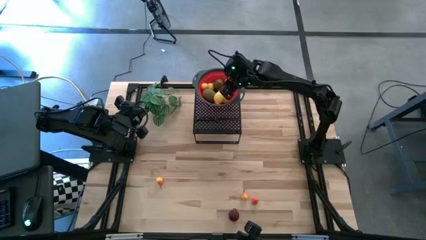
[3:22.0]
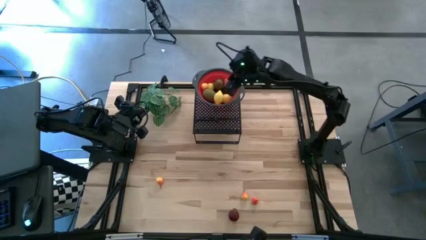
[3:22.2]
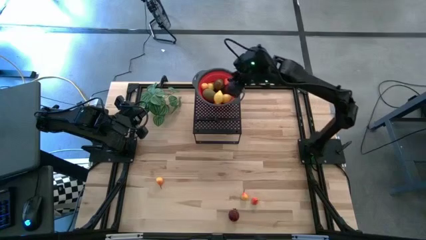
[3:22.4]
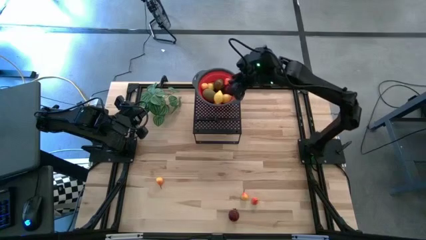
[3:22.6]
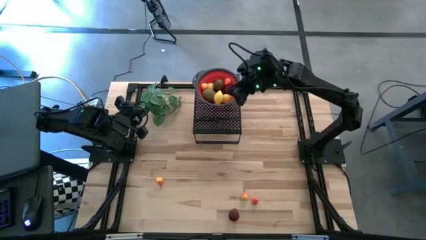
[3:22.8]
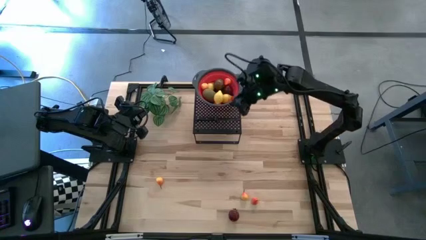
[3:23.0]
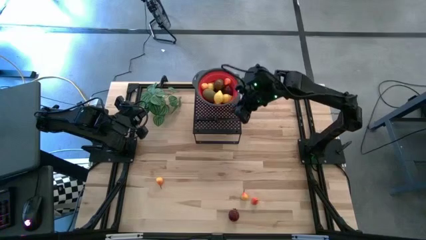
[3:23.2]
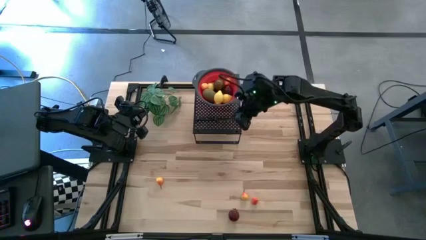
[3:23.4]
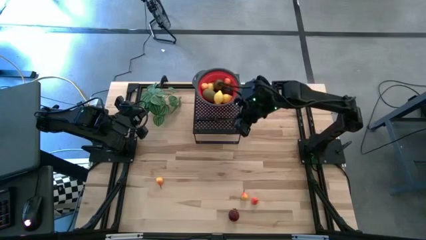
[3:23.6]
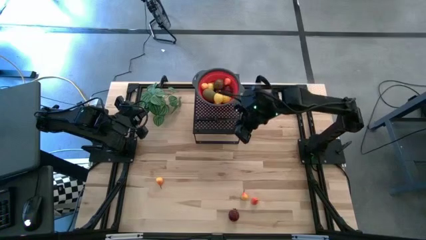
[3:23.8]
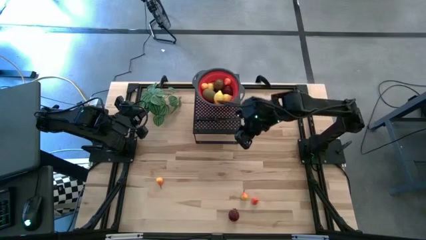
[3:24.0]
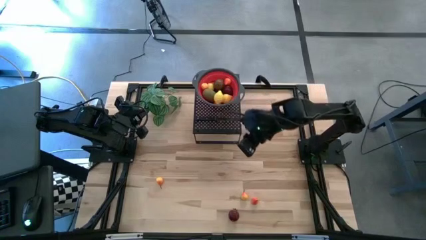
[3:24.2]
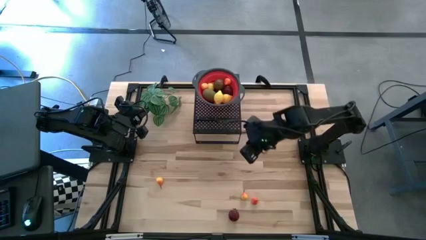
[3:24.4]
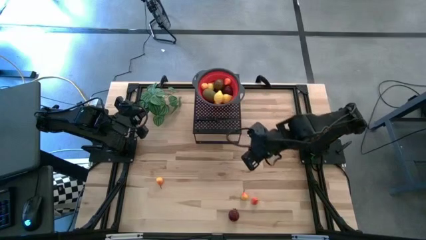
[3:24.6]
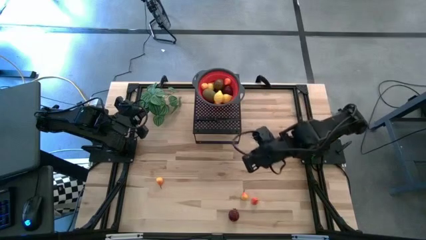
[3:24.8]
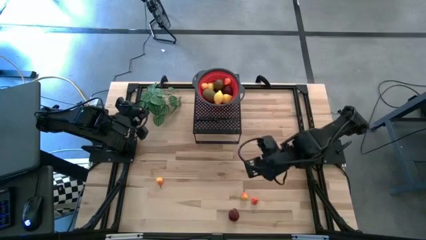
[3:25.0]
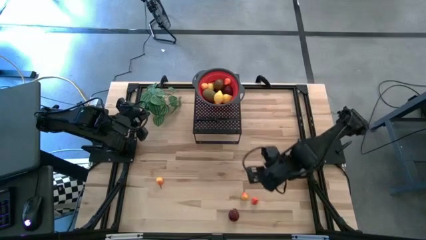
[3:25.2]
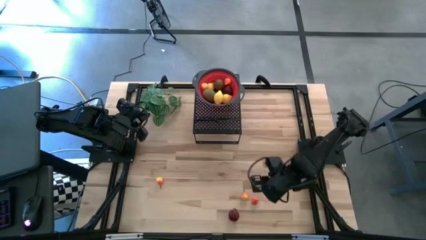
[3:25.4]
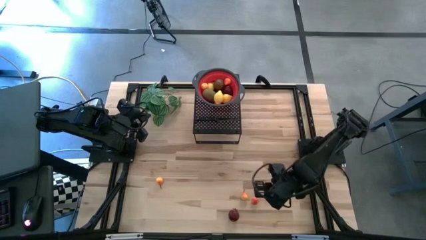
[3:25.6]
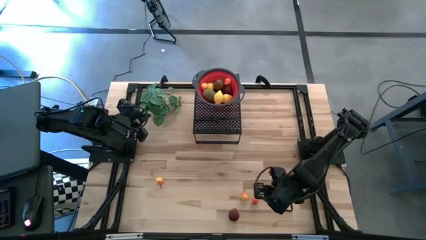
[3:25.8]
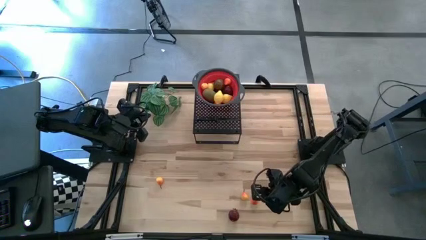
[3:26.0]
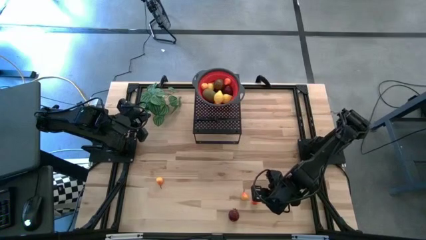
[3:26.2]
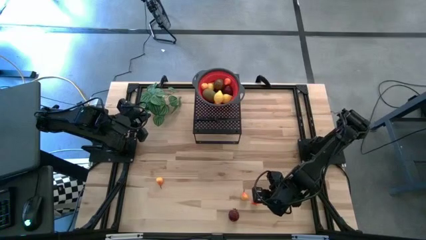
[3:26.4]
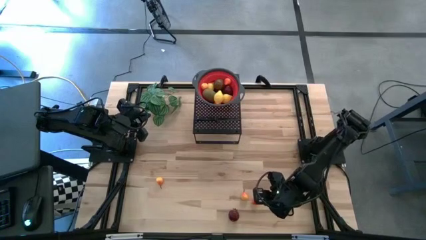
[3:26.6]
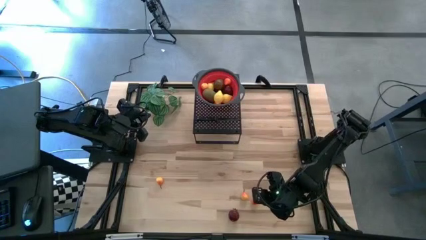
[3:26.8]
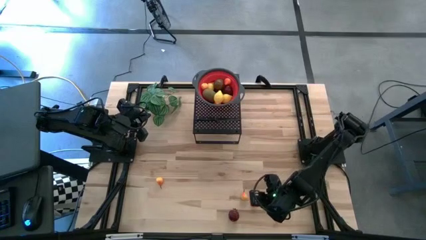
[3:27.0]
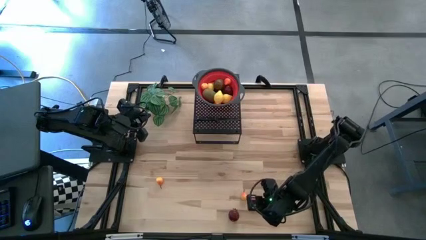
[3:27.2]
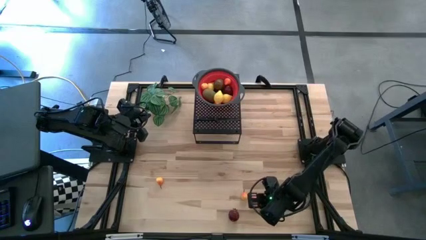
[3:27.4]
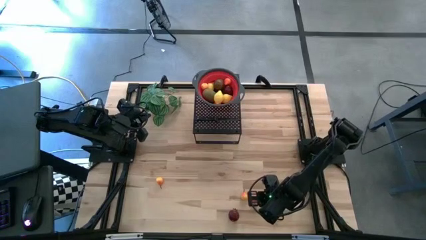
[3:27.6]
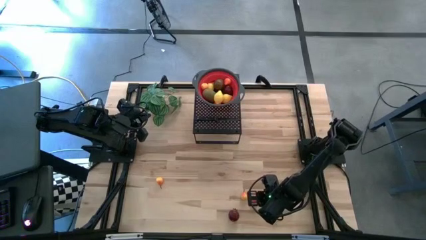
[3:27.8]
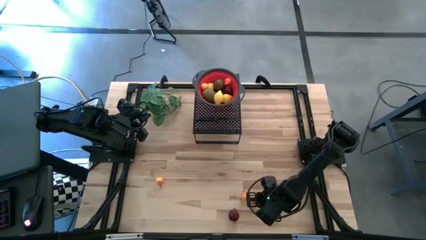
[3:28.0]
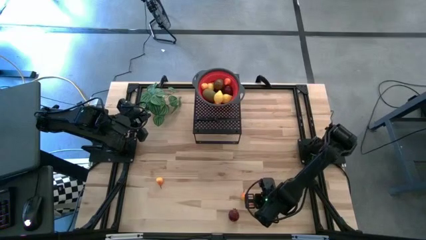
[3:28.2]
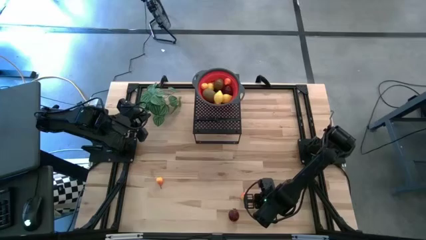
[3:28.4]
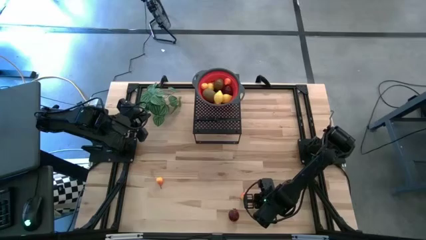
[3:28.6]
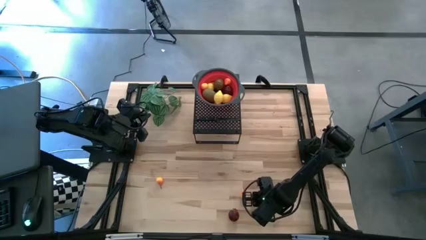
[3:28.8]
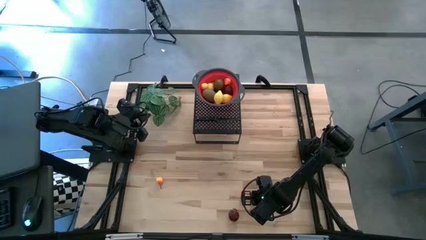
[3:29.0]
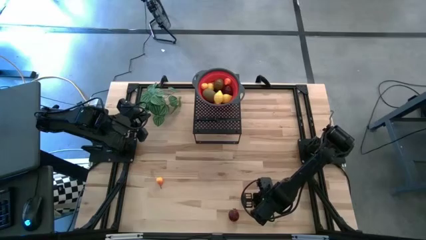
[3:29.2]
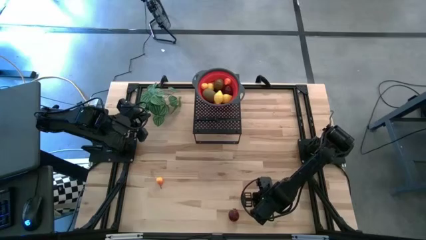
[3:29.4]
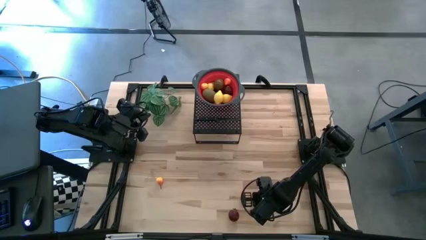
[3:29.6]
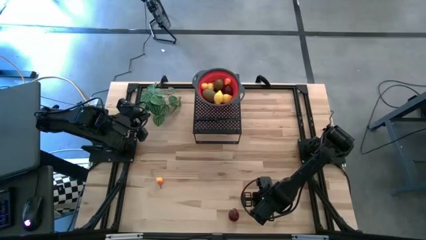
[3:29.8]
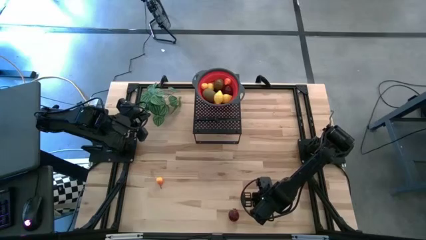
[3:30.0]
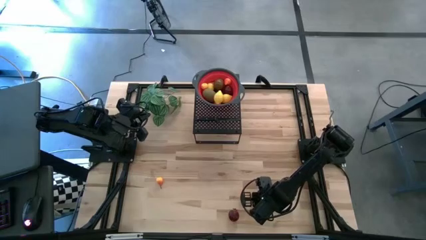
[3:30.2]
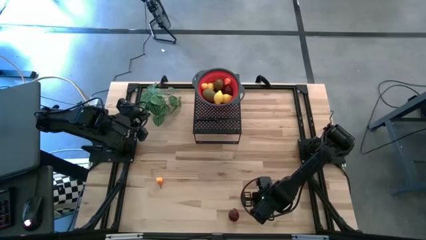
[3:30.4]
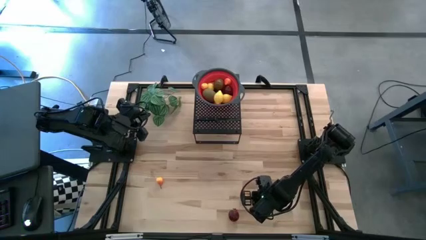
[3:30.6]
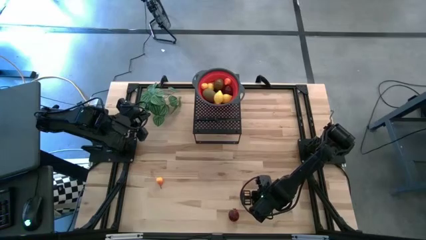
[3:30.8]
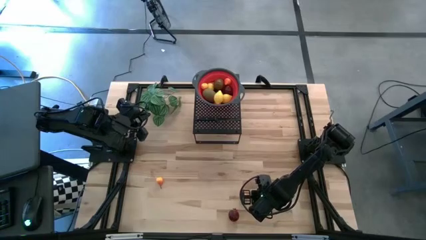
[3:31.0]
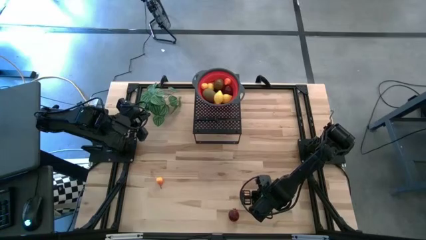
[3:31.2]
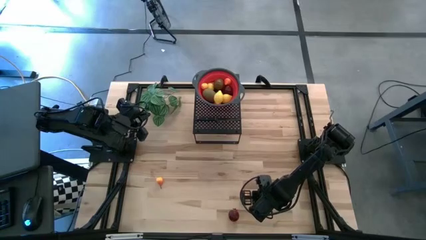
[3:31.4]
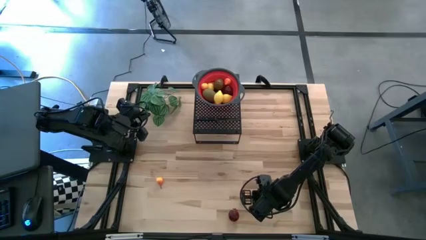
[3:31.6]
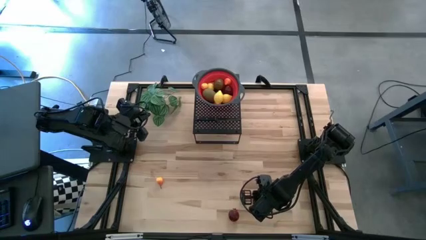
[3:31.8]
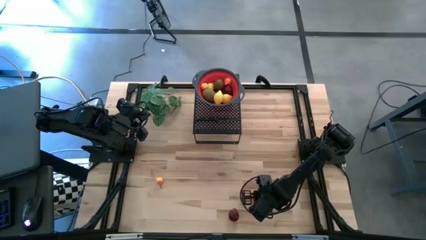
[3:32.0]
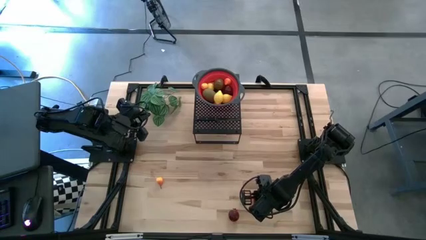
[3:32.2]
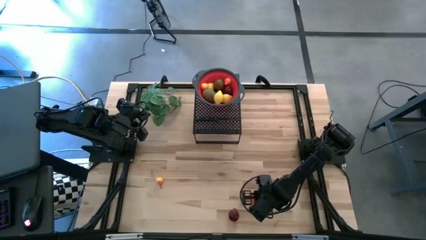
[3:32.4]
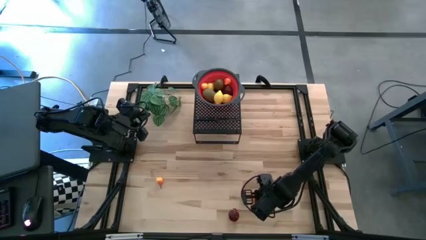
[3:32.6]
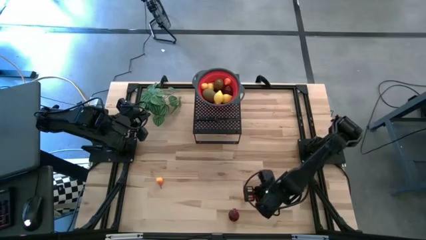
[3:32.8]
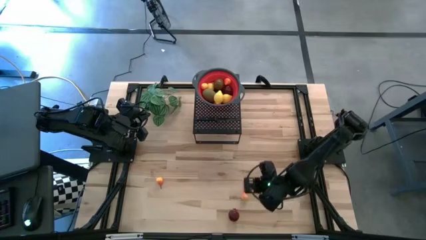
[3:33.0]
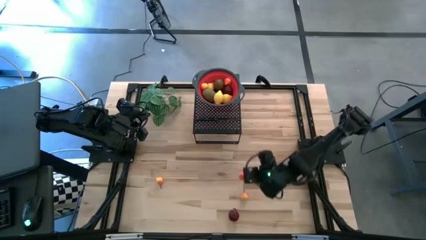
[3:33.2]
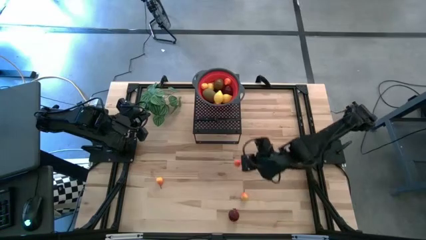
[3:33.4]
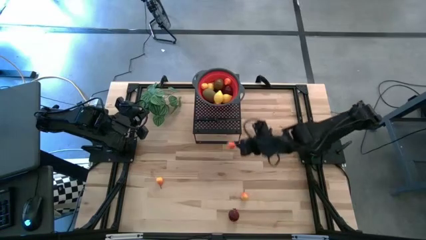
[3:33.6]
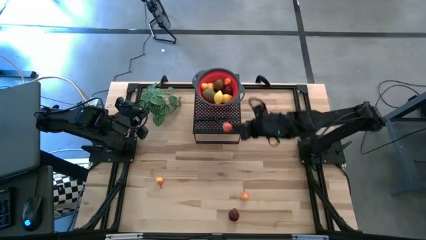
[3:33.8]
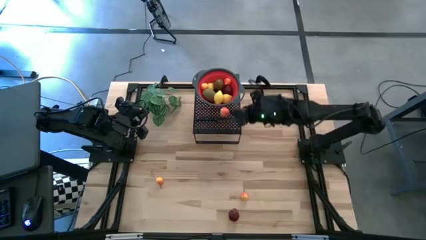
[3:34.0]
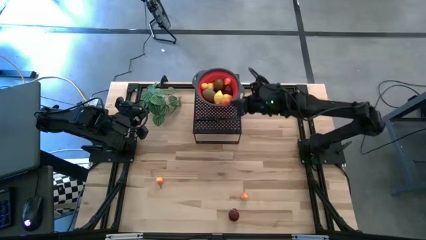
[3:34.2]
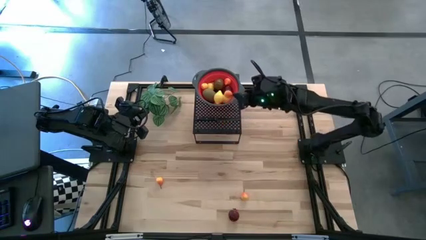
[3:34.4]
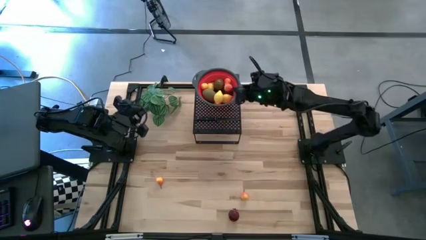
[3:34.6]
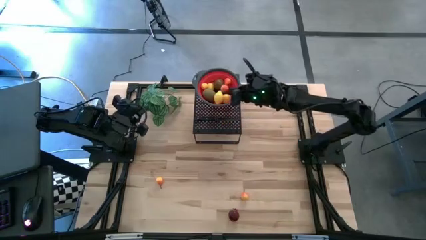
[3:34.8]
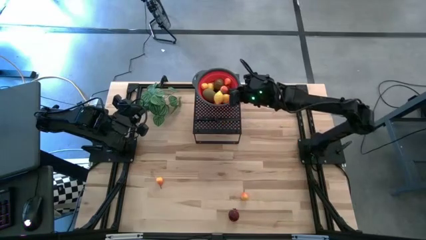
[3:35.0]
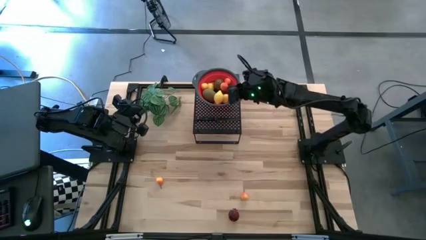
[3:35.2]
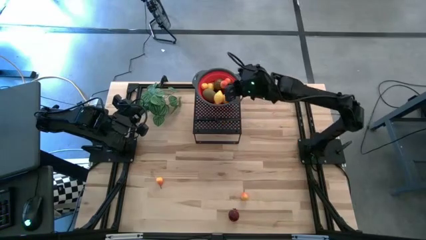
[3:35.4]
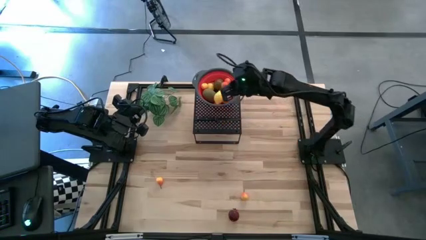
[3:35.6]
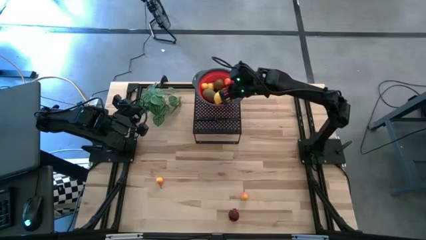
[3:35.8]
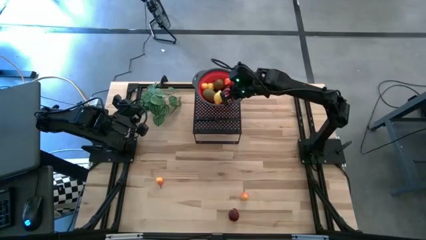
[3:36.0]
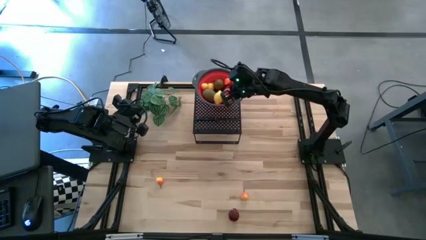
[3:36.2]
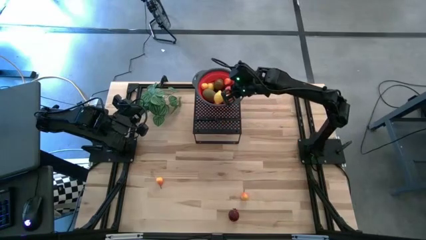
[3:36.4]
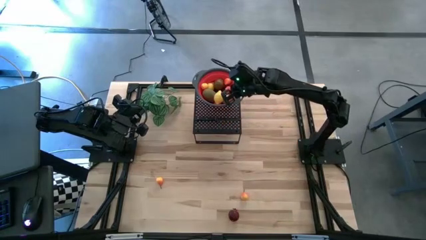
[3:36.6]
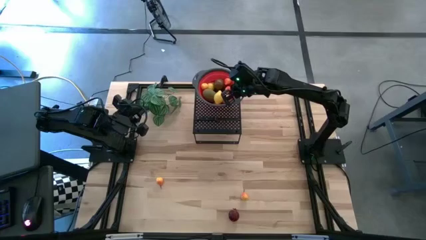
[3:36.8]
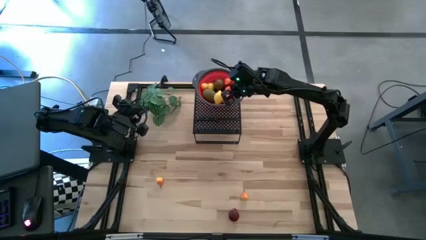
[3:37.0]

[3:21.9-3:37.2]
Task: Pick & Place Fruit
Put the pear into the red strainer bowl
